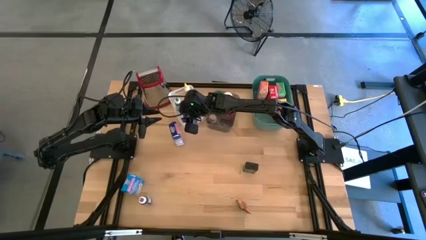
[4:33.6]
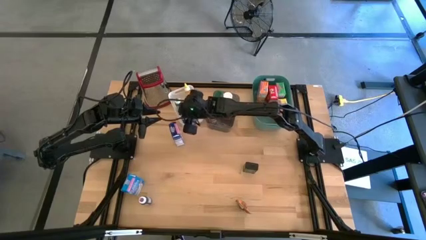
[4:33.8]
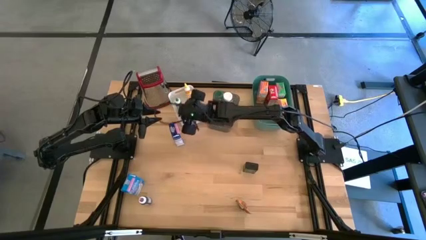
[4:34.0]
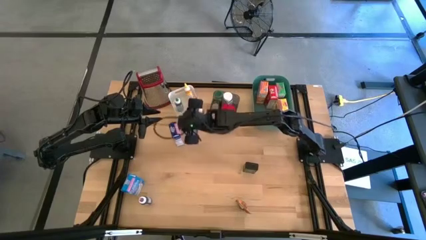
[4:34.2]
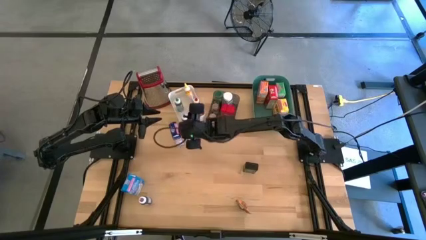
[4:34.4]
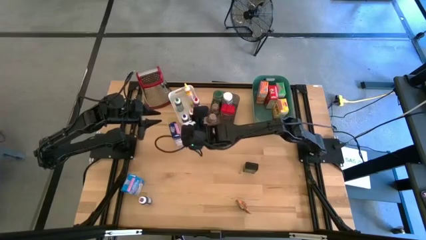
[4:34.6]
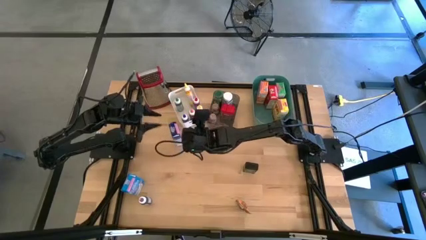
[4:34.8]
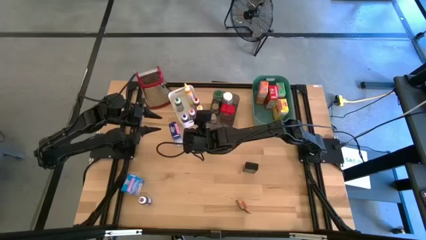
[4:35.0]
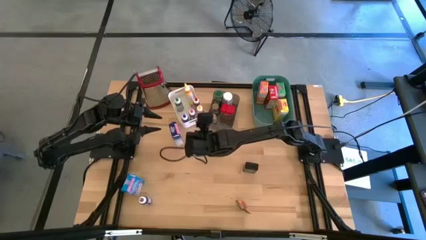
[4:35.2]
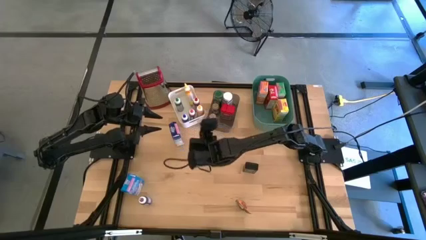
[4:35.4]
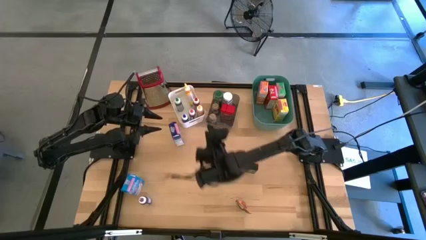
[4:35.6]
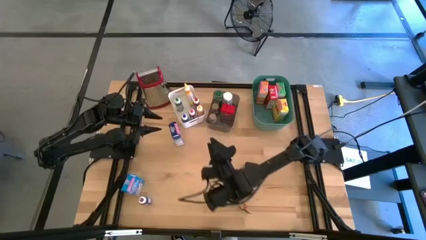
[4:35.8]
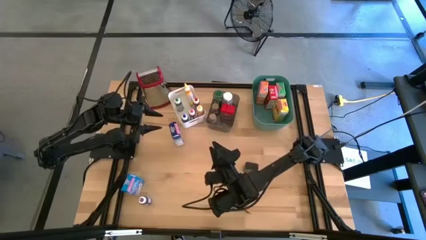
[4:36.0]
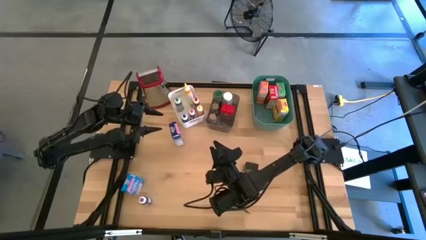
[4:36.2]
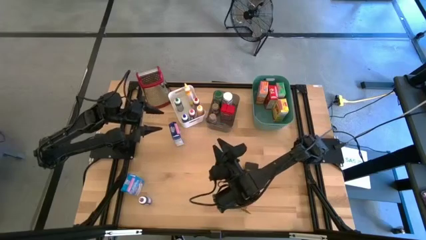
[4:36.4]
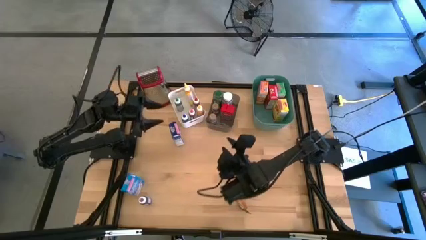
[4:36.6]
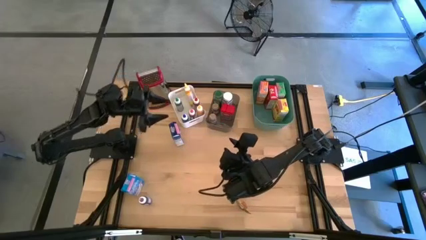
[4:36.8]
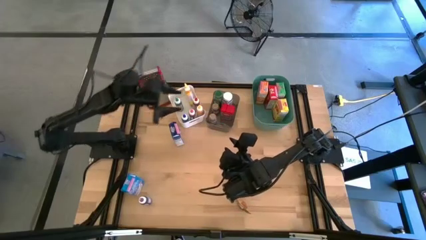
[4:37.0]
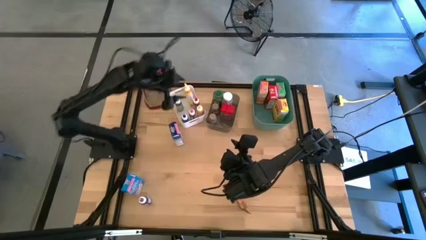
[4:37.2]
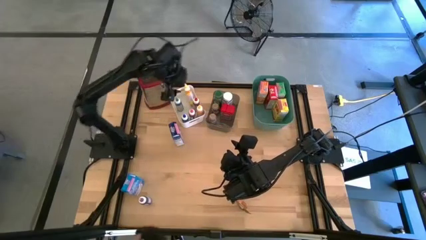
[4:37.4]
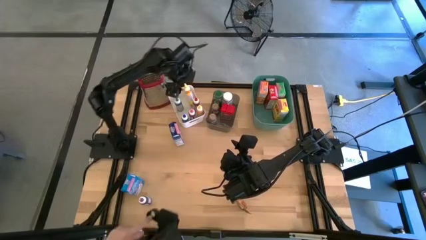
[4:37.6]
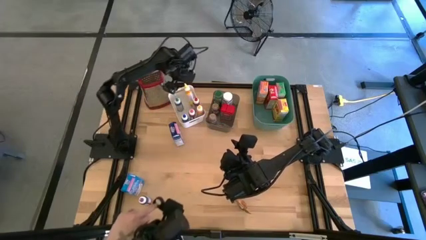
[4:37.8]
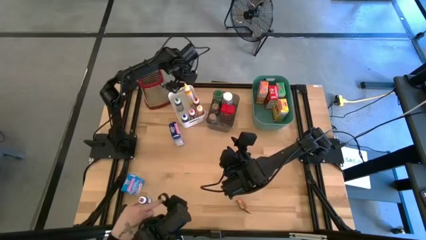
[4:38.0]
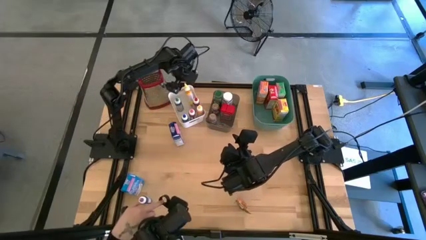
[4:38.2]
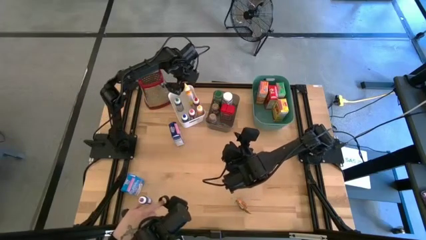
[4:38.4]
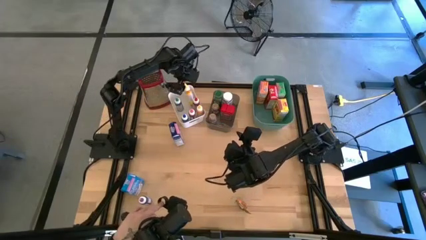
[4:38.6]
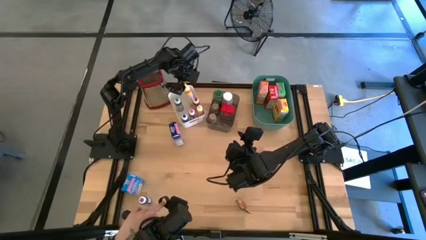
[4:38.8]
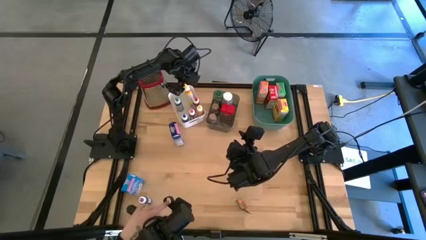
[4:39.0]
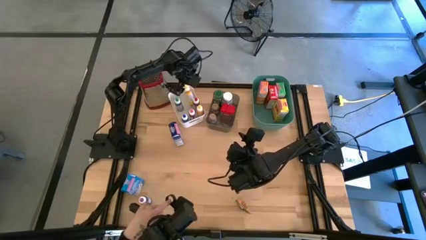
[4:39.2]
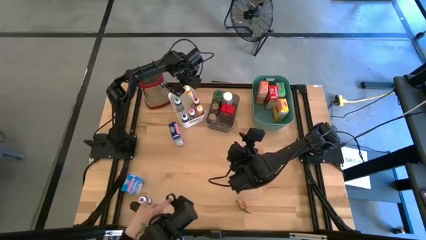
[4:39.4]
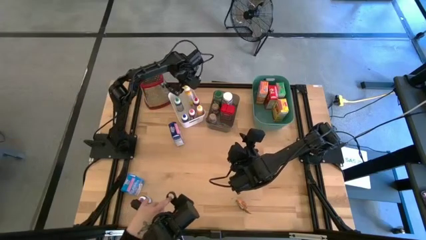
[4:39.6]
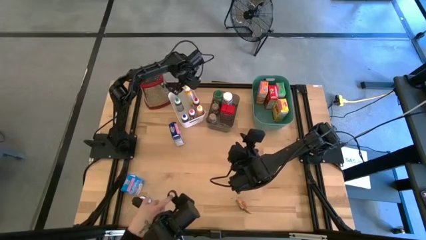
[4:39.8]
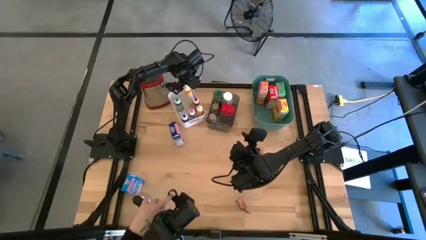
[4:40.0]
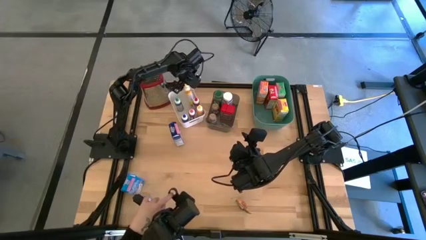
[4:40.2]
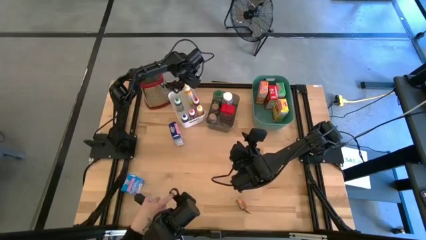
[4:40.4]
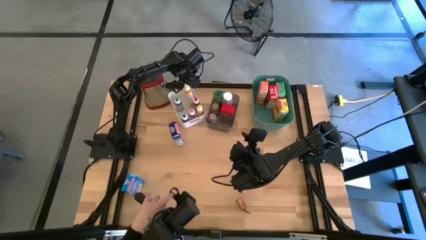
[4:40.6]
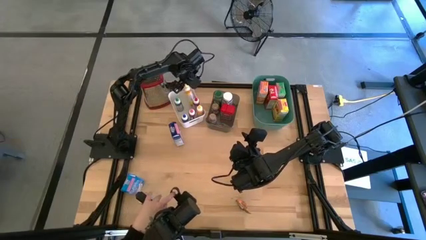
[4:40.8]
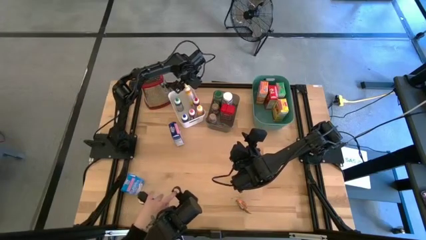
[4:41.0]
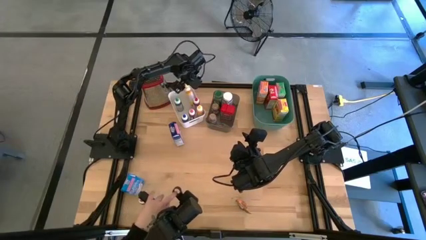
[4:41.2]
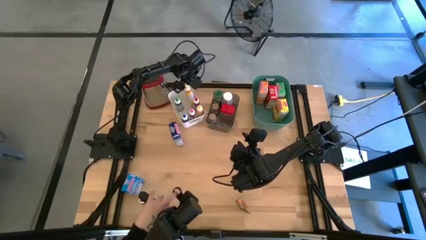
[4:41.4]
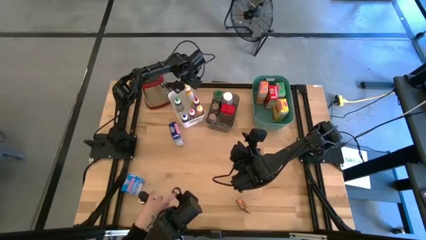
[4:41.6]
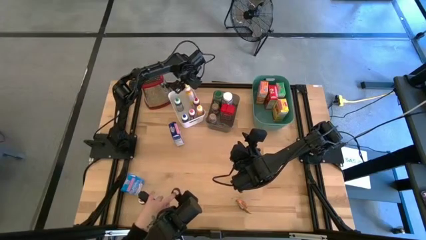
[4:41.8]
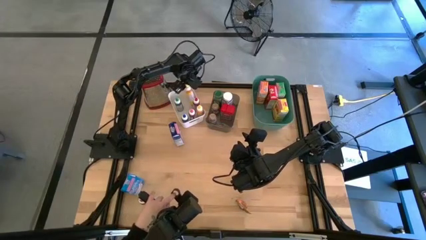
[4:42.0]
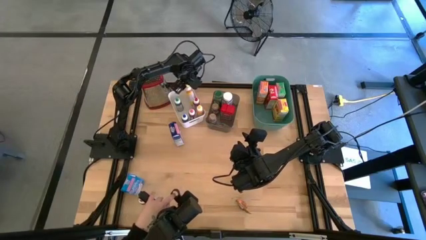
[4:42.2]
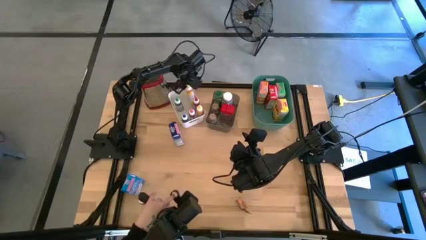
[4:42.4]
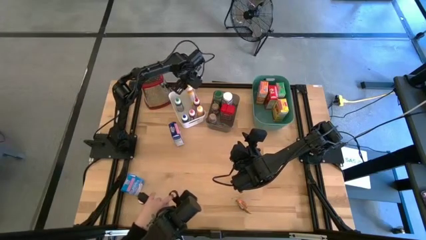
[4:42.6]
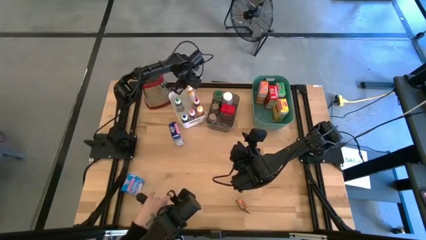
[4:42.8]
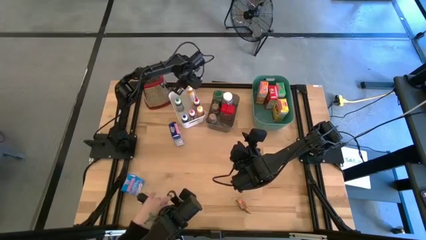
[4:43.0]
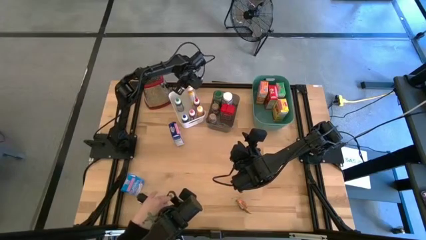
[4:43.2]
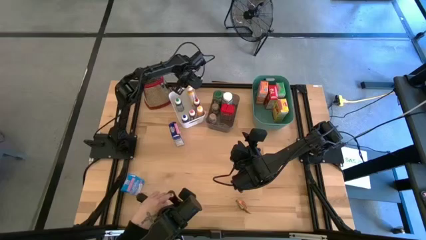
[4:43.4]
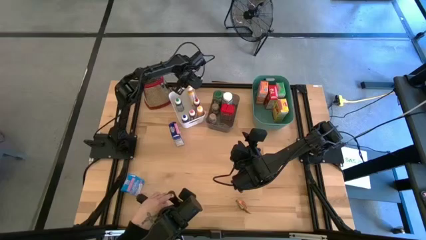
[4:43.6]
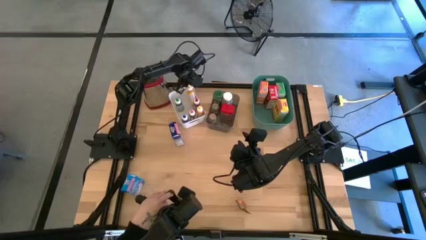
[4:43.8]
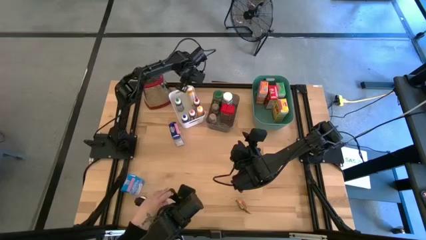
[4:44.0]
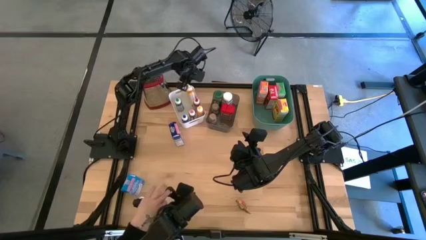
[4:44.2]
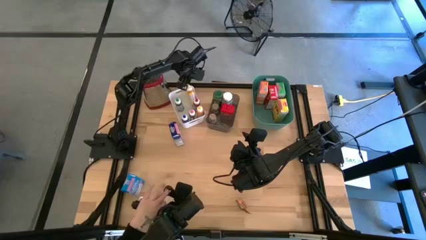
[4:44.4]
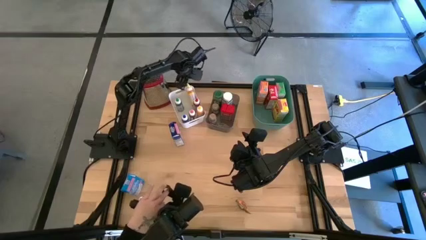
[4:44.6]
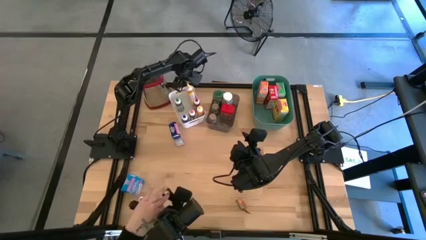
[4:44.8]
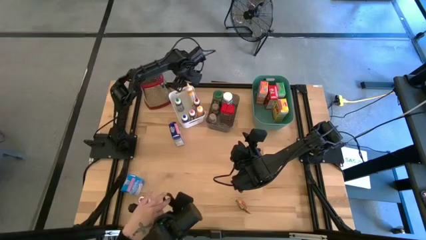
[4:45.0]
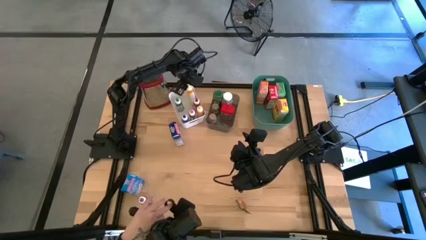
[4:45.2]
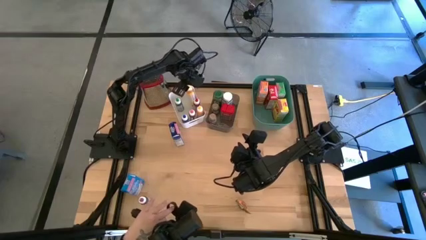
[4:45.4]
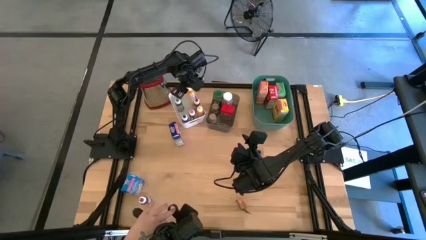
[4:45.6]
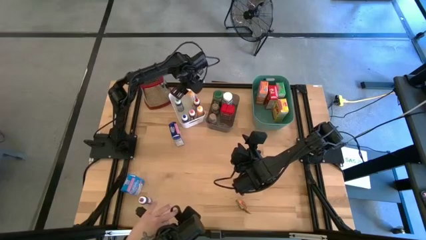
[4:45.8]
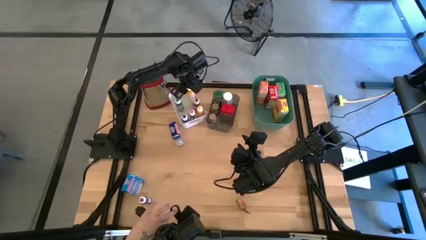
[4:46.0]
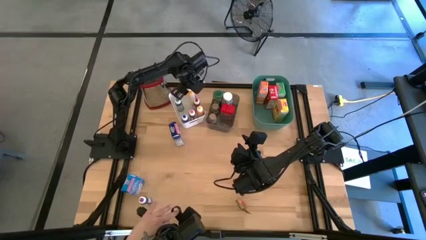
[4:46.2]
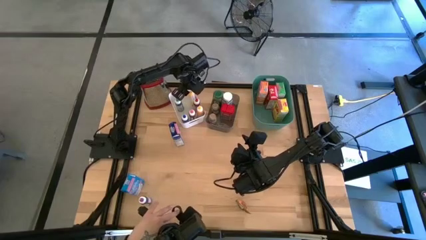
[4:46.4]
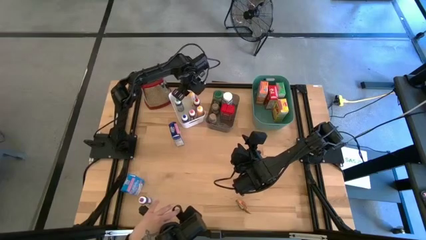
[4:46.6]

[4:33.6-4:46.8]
Task: Pick & Place Kitchen Items
Adjust the yellow food coloring in the white bin

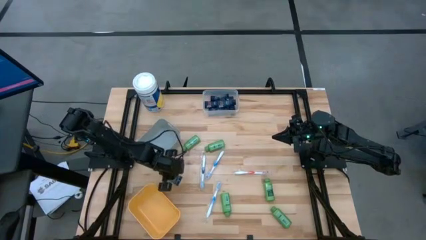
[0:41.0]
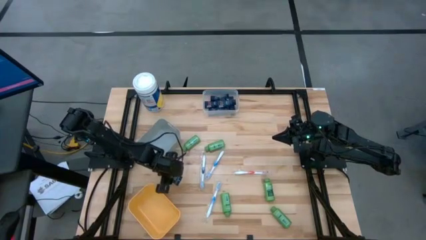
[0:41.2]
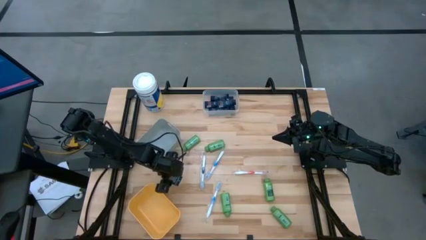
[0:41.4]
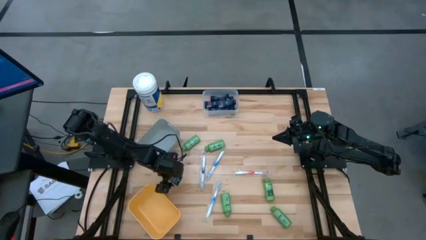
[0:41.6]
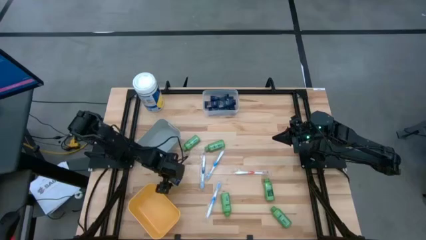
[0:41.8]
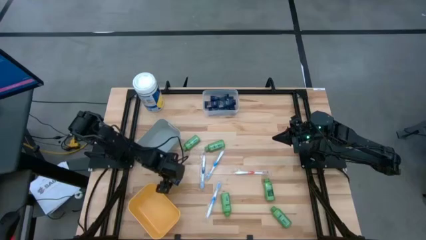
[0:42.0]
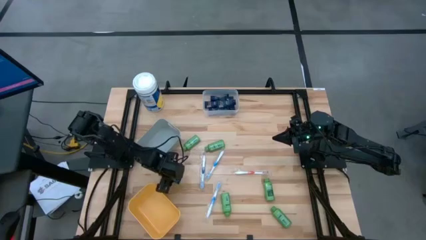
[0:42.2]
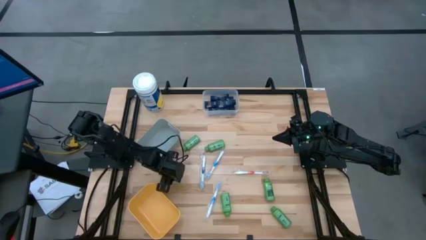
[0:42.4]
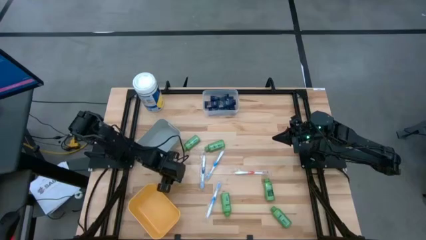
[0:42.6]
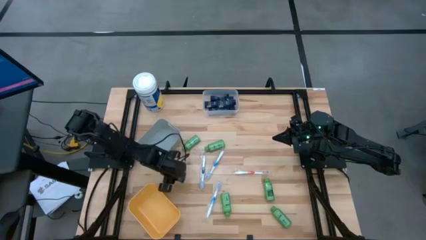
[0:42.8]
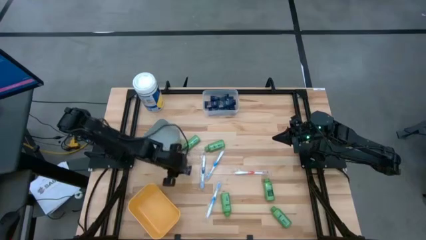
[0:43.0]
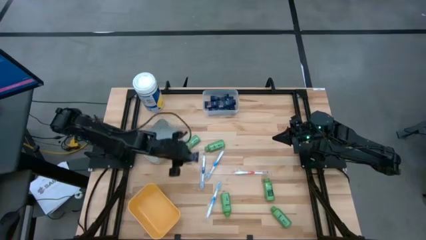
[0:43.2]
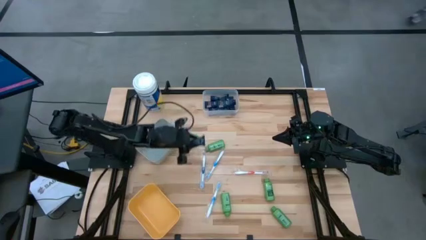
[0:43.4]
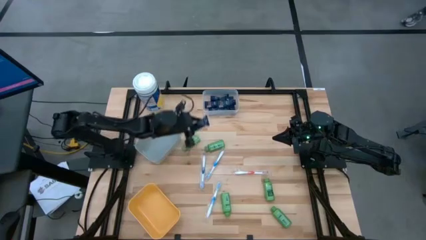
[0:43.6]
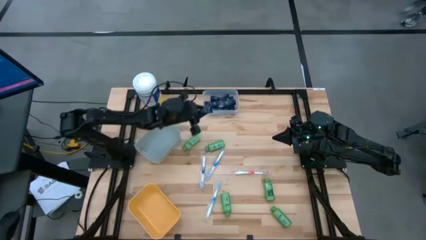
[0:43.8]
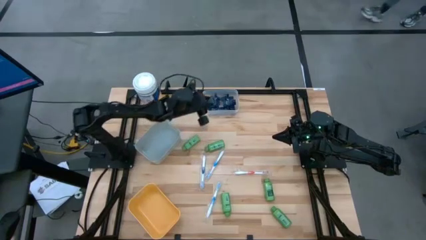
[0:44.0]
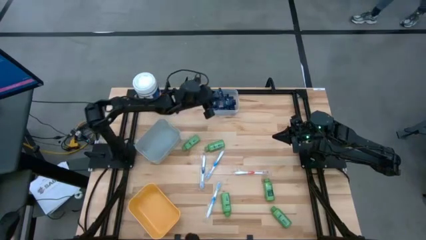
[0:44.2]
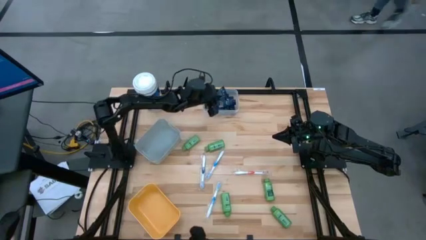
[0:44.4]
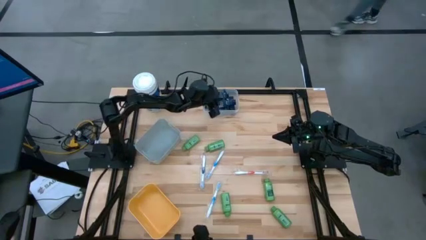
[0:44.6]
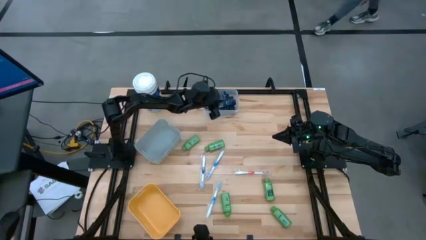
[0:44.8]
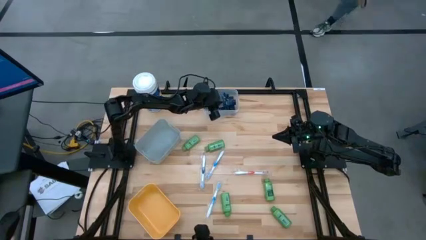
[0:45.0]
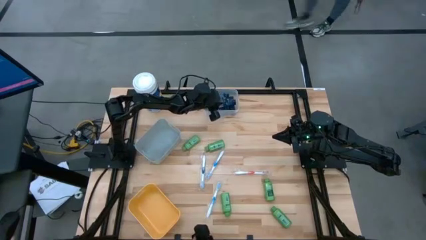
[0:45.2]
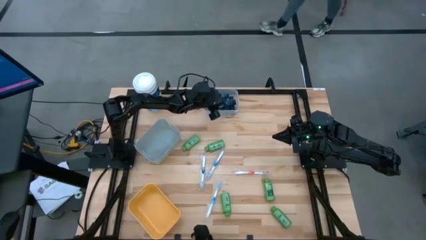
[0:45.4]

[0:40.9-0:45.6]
Task: Pick & Place Travel size toiletries
Put the blue shave cream into the transparent bin
